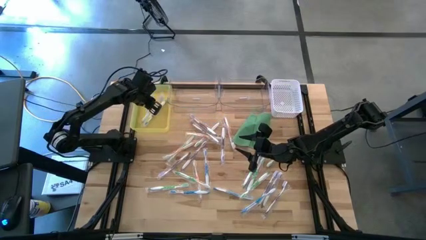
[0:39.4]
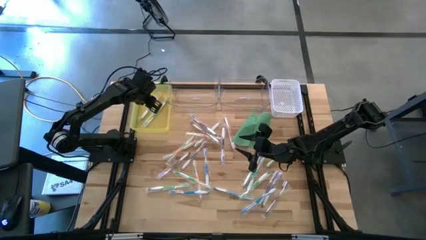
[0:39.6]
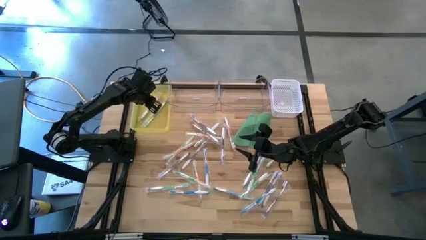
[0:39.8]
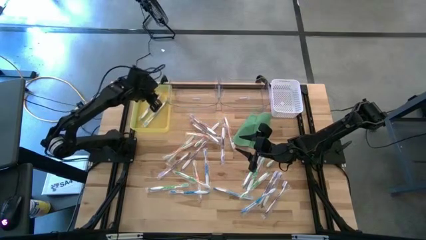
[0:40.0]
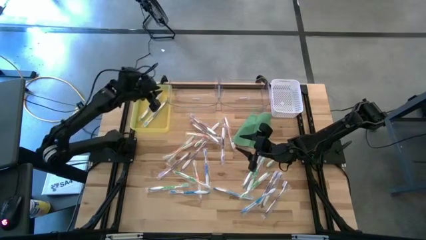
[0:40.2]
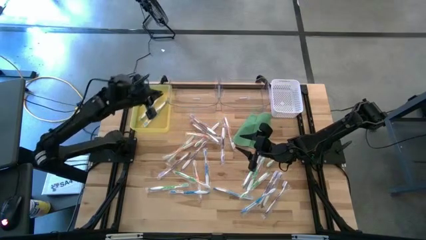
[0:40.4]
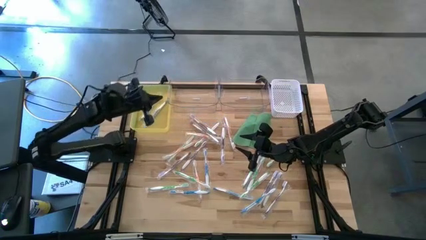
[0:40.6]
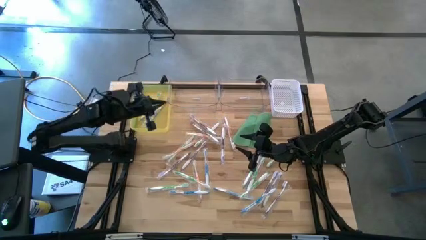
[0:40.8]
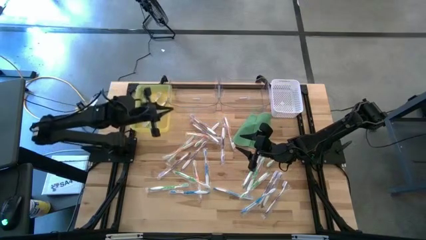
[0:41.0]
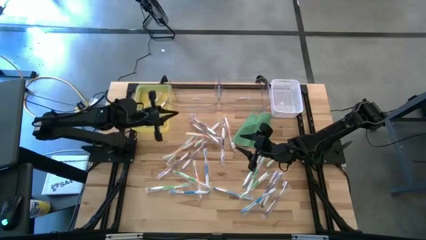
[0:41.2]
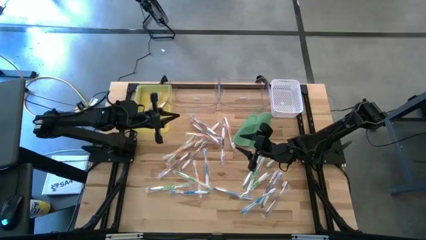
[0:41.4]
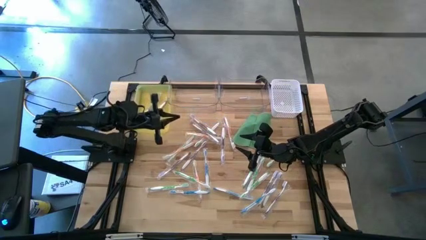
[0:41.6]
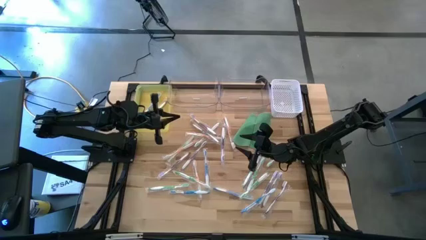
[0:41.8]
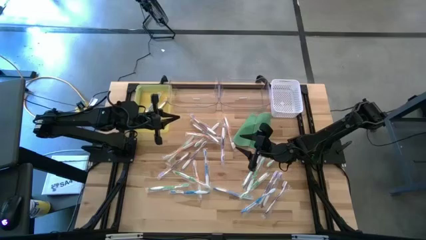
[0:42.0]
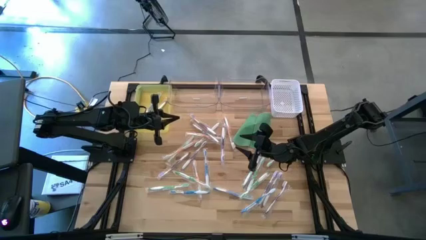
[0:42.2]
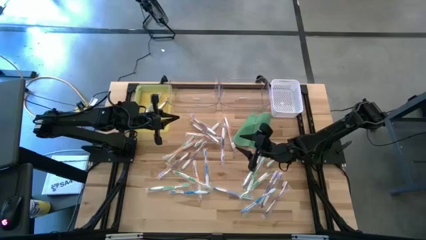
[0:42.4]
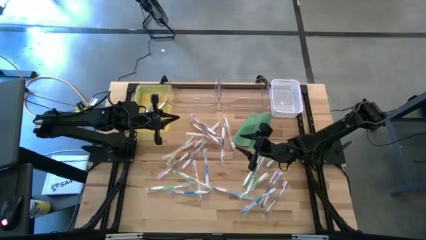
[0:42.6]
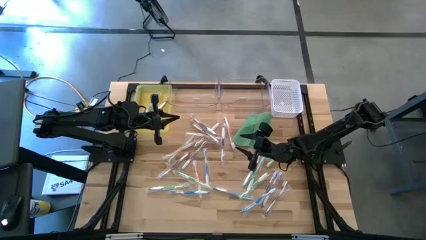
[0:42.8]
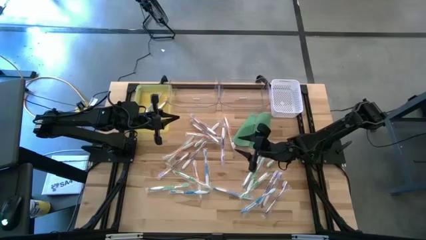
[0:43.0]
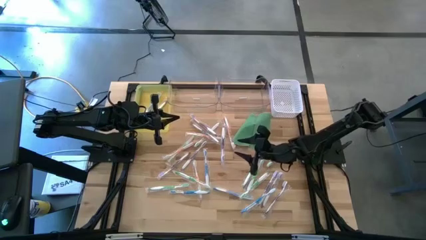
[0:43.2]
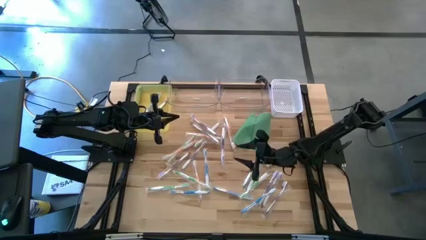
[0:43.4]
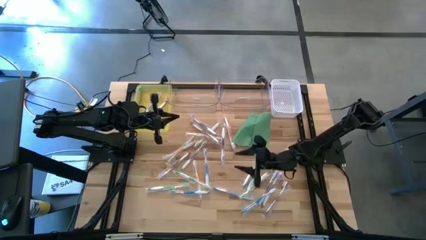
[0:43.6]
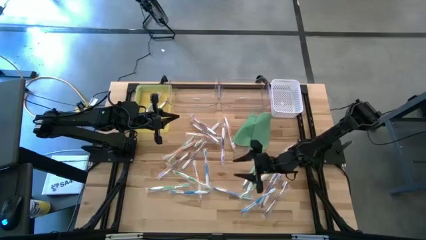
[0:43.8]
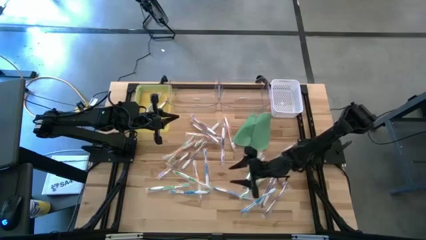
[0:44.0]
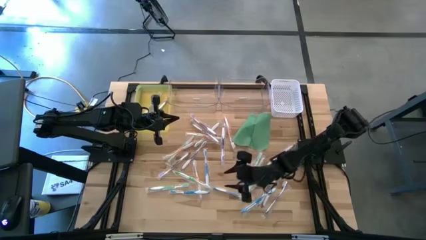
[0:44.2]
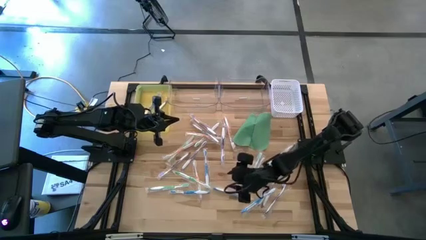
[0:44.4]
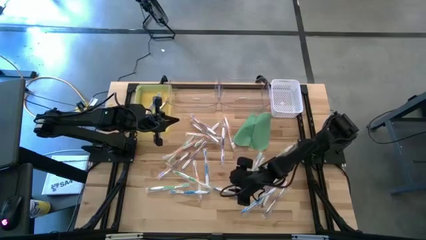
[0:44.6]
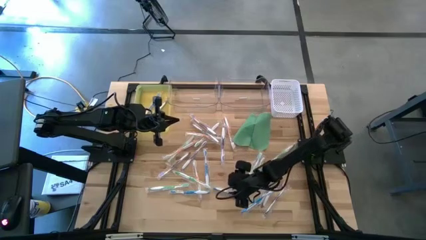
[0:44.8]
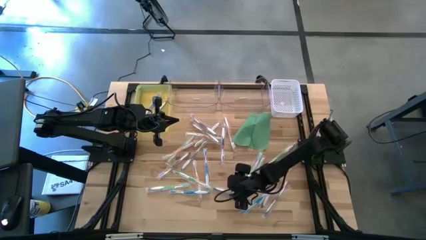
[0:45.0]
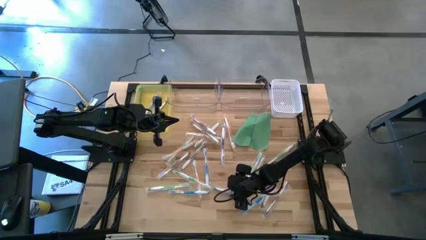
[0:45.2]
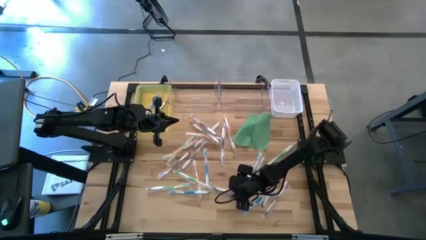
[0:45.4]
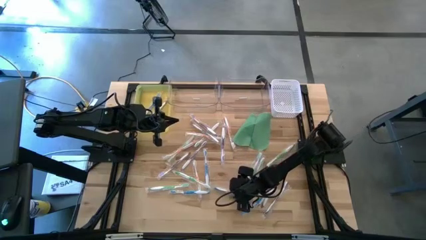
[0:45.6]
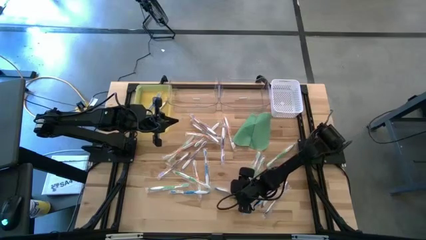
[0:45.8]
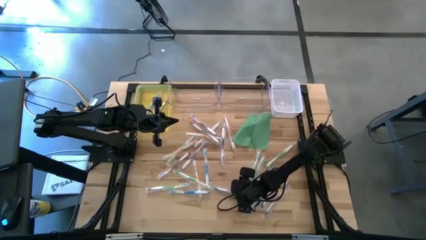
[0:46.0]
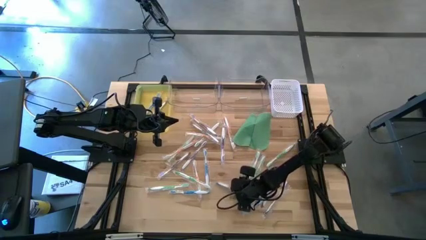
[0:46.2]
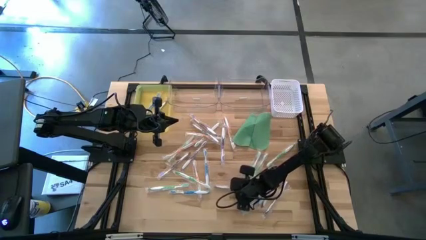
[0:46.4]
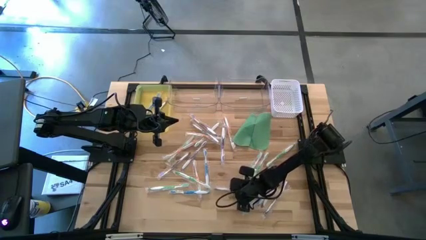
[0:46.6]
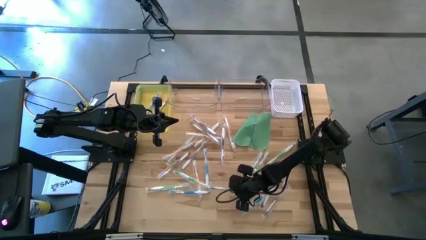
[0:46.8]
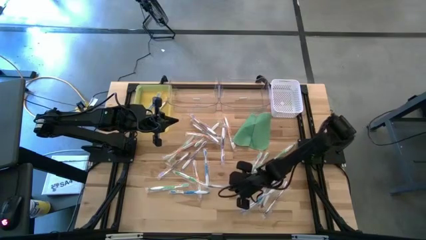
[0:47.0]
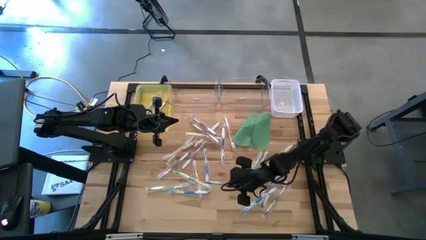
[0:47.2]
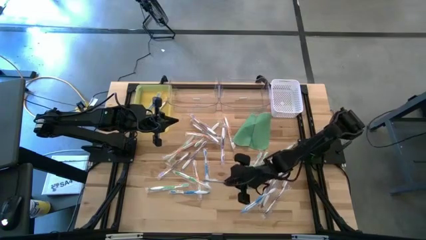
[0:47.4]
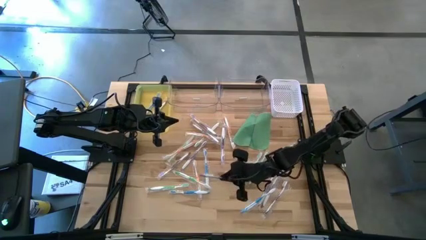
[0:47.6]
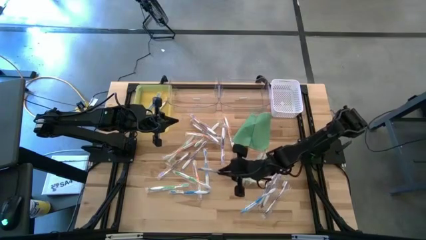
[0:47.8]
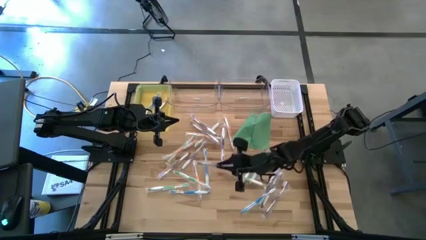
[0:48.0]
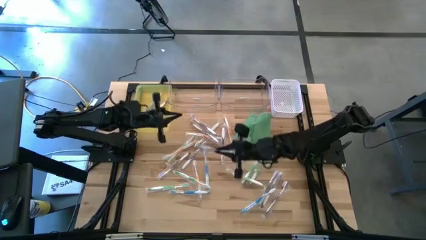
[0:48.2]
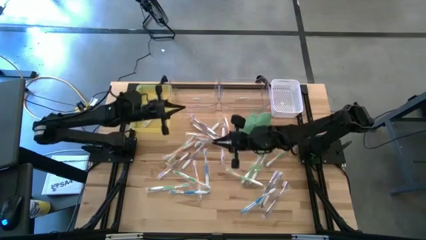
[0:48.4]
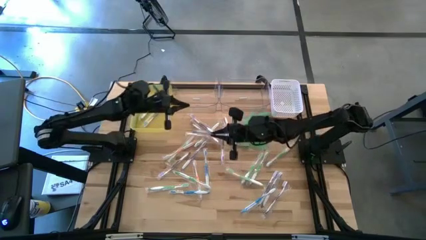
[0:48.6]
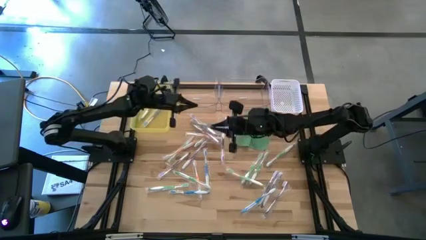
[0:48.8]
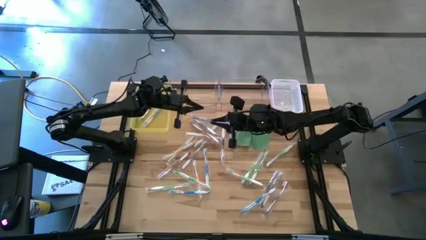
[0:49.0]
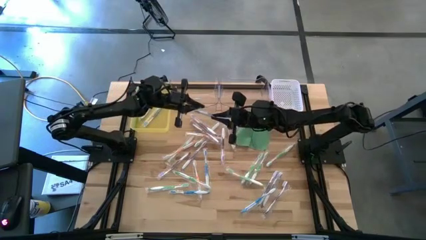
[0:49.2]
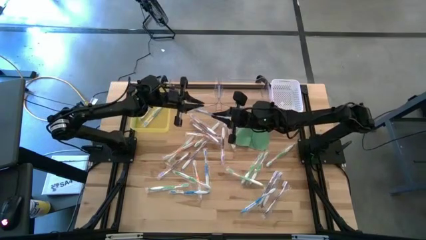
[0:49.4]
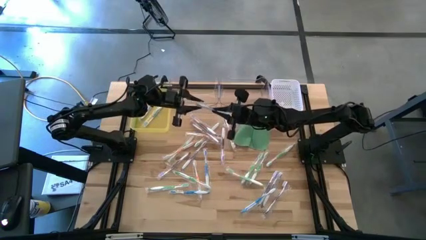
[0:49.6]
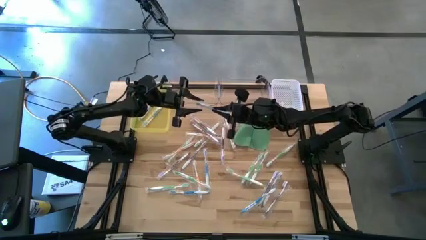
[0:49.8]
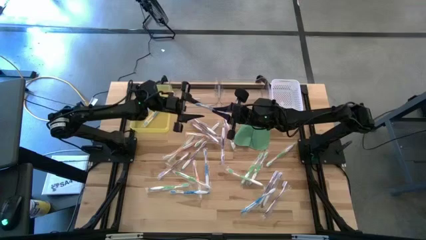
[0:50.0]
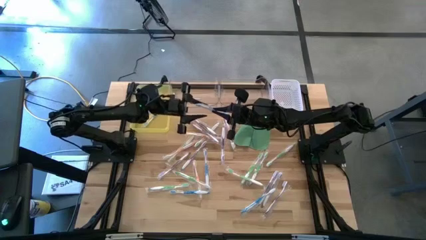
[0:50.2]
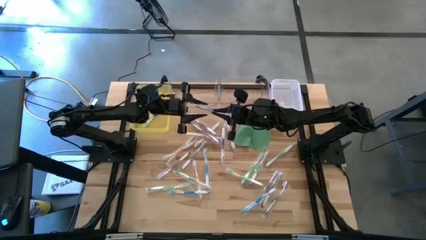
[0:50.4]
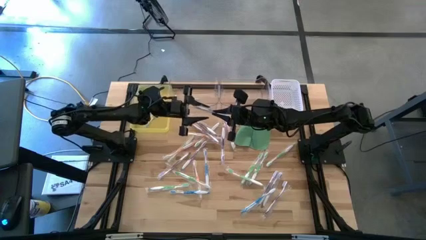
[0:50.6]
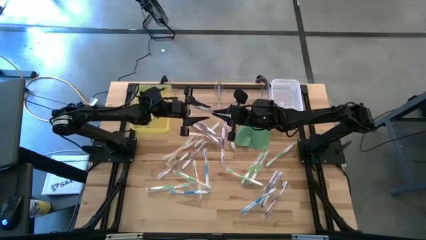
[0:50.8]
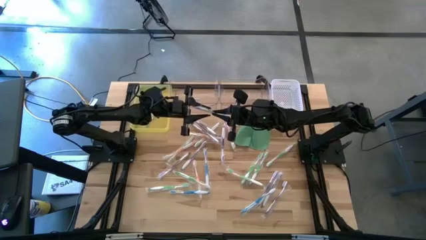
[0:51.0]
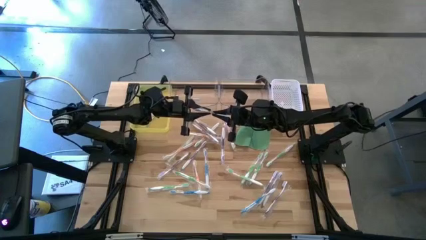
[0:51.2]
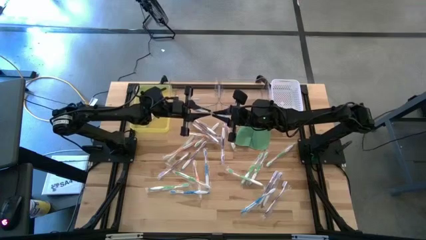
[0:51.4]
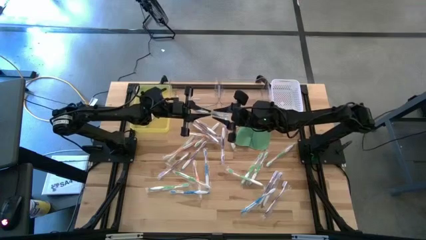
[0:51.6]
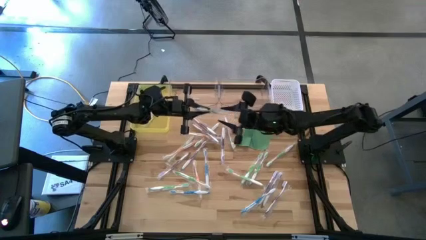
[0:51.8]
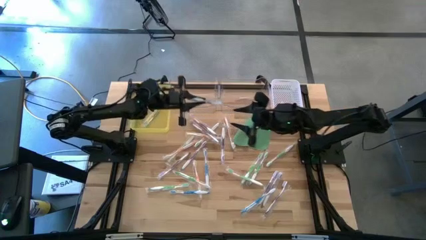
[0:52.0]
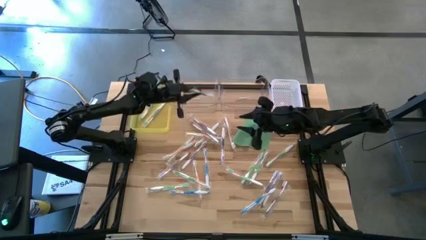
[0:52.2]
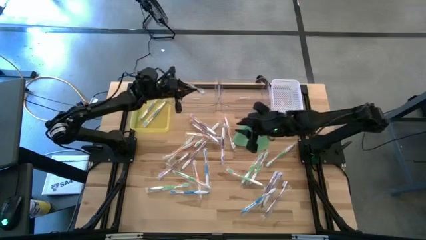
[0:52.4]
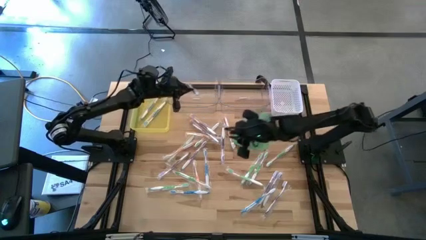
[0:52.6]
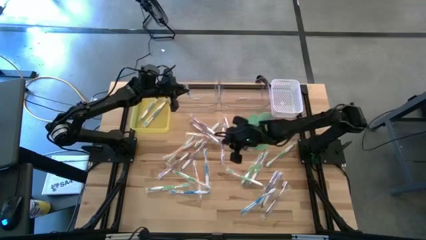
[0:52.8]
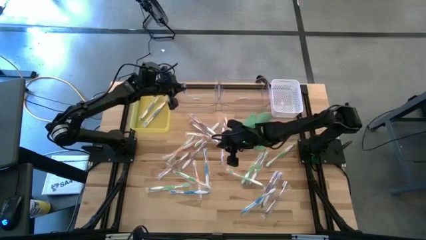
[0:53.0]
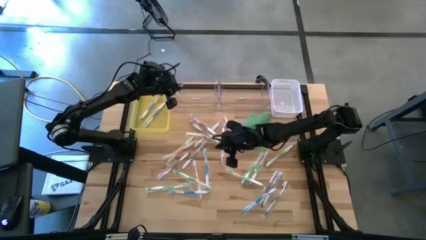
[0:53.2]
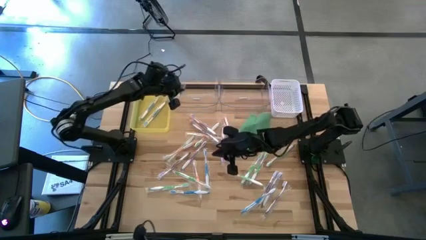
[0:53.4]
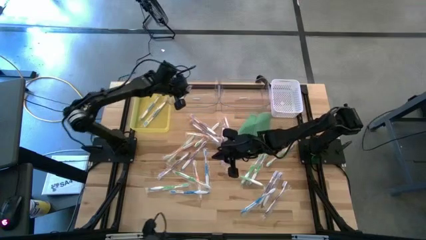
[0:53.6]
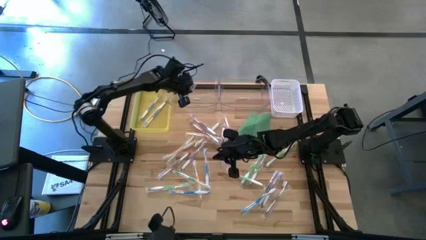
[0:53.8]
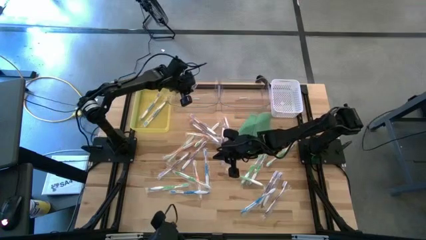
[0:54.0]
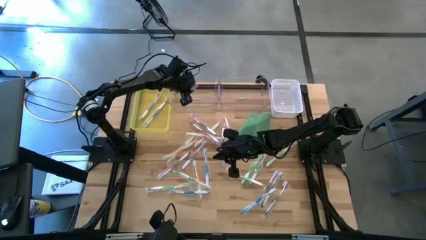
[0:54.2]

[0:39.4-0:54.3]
Task: Pick & Place Toothbrushes
Put the blue toothbrush into the yellow bin
